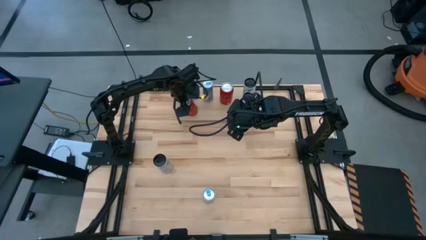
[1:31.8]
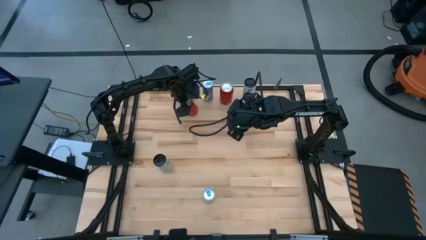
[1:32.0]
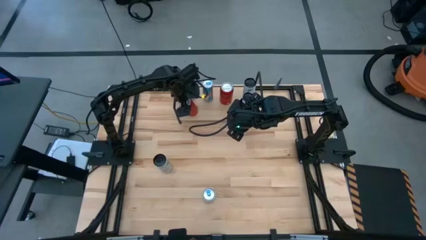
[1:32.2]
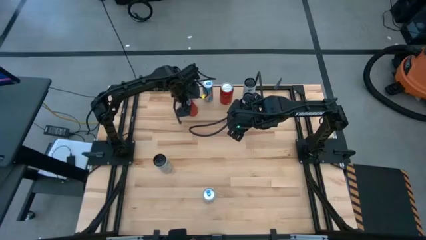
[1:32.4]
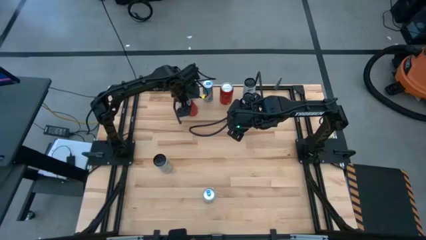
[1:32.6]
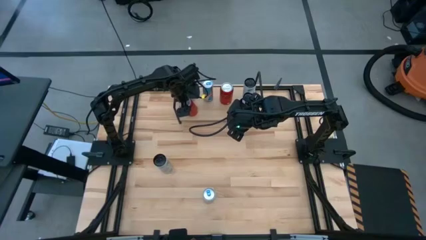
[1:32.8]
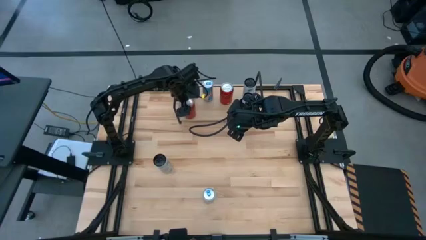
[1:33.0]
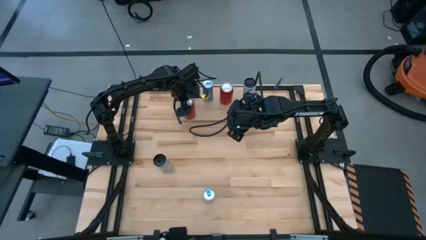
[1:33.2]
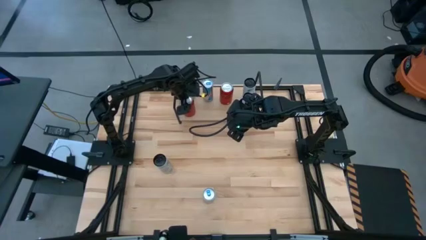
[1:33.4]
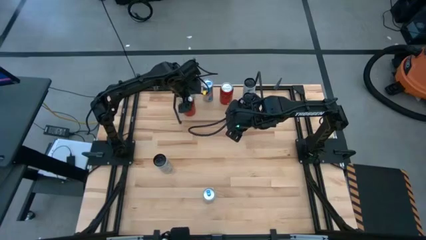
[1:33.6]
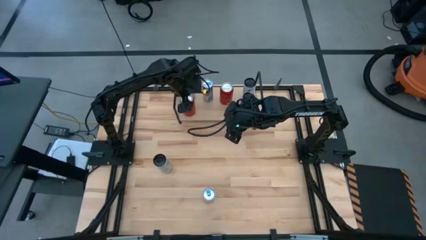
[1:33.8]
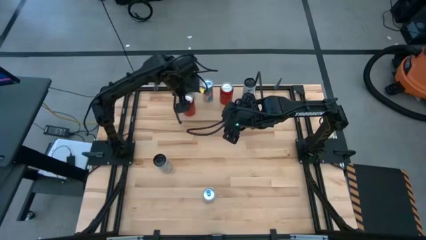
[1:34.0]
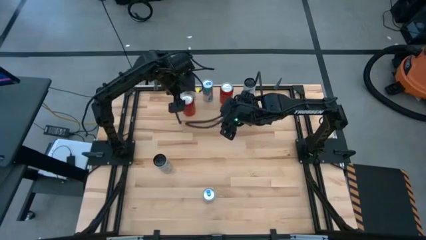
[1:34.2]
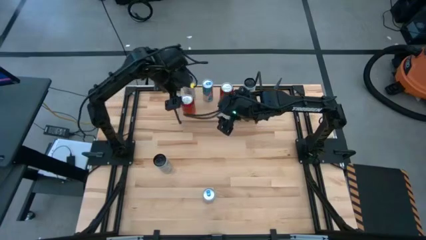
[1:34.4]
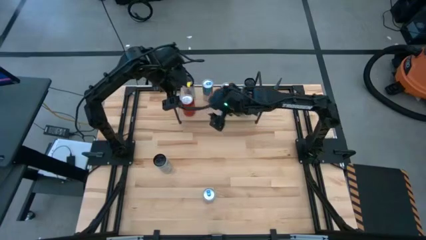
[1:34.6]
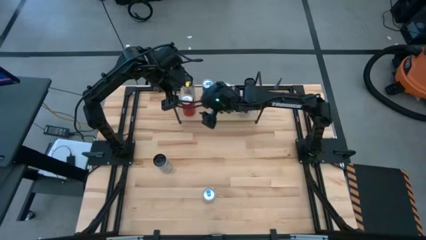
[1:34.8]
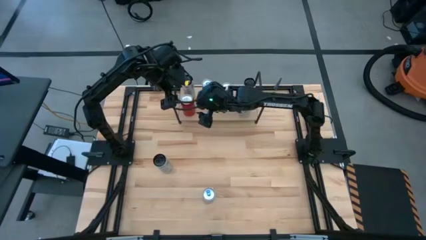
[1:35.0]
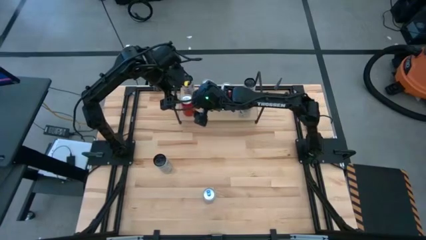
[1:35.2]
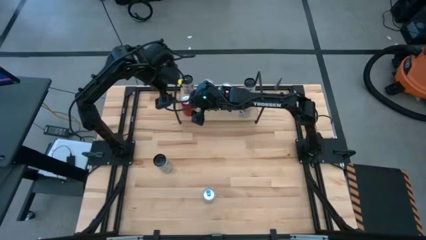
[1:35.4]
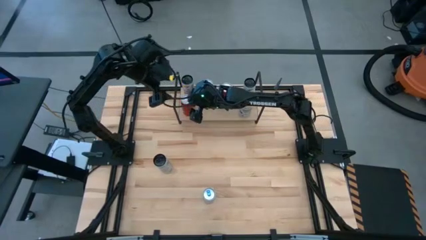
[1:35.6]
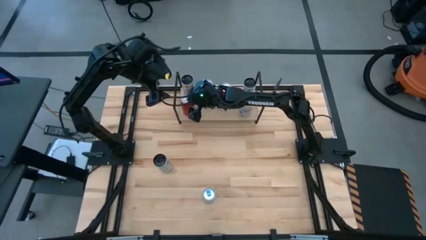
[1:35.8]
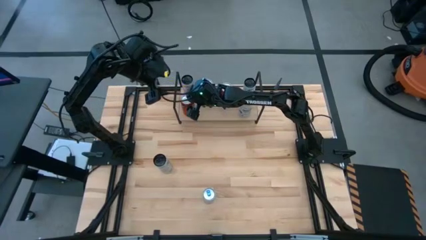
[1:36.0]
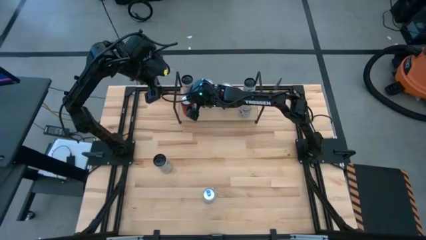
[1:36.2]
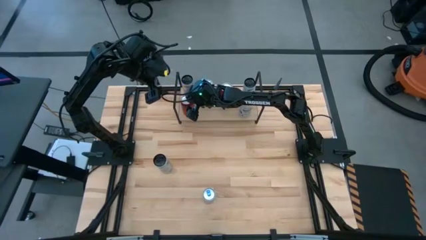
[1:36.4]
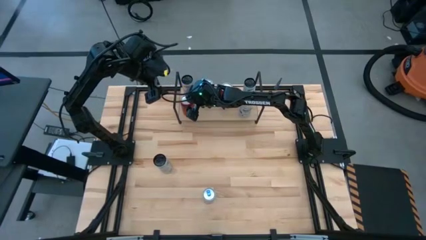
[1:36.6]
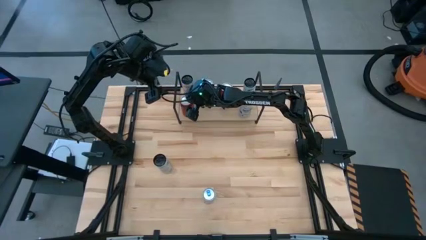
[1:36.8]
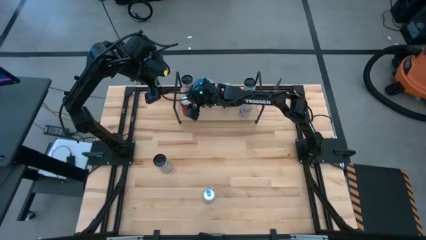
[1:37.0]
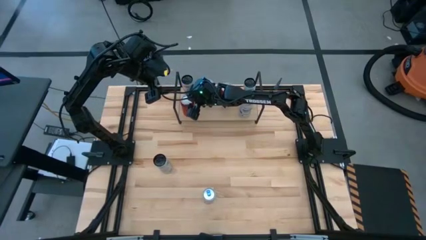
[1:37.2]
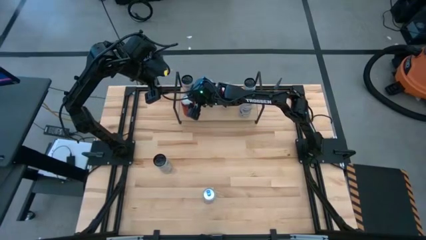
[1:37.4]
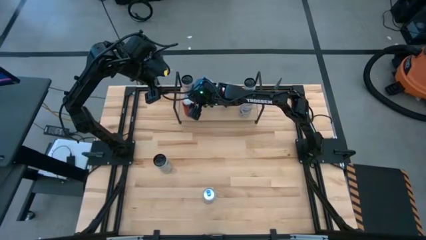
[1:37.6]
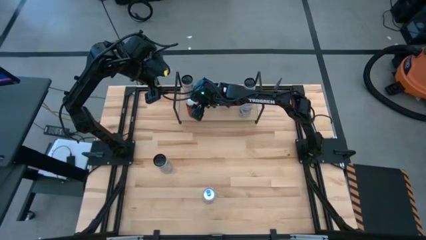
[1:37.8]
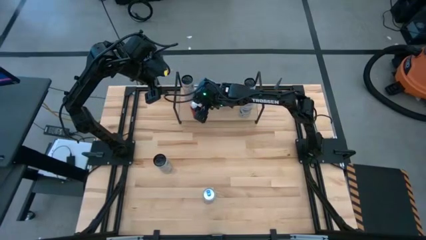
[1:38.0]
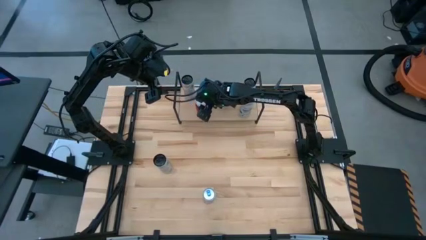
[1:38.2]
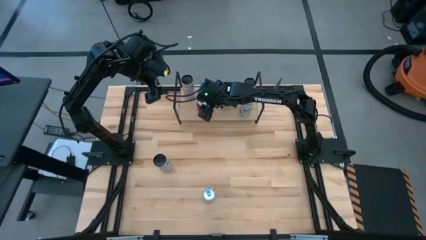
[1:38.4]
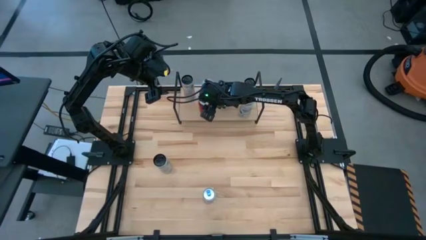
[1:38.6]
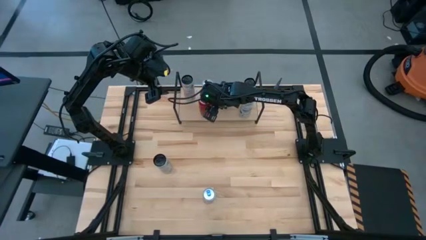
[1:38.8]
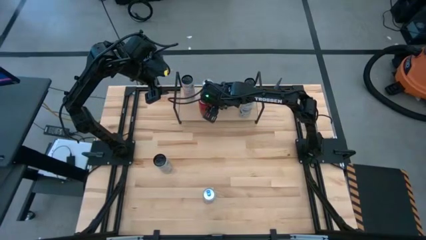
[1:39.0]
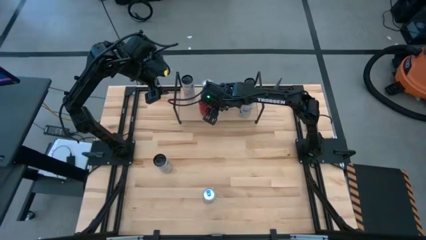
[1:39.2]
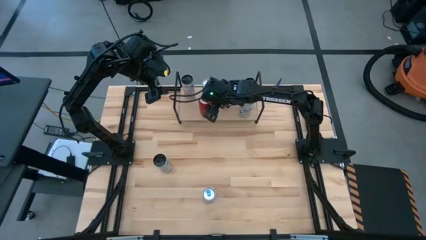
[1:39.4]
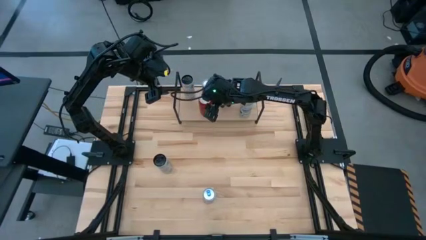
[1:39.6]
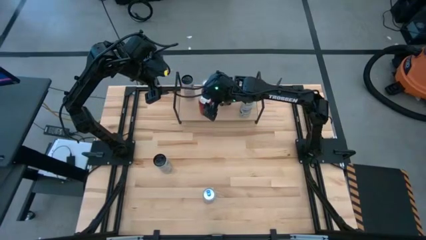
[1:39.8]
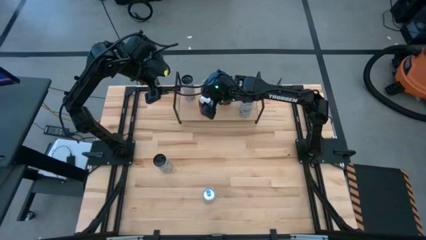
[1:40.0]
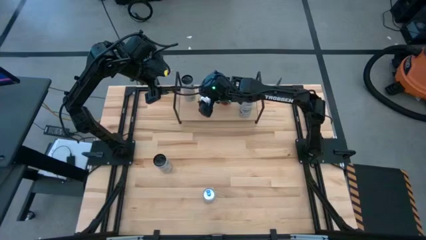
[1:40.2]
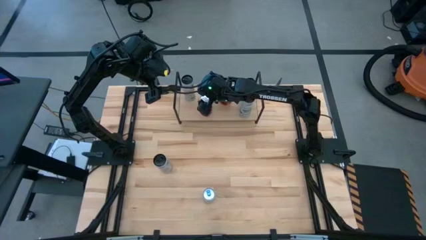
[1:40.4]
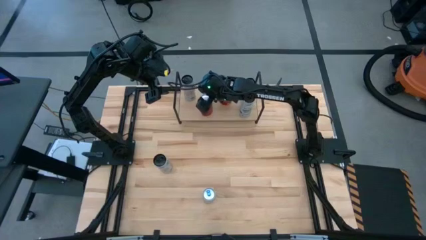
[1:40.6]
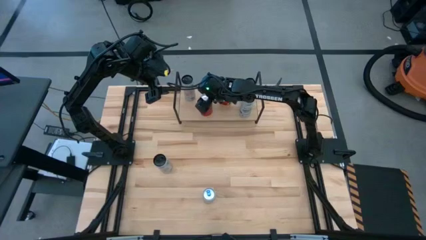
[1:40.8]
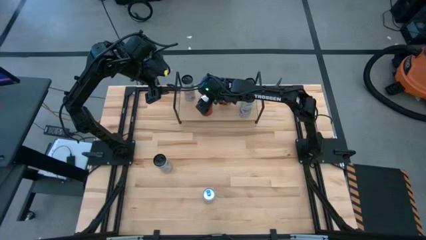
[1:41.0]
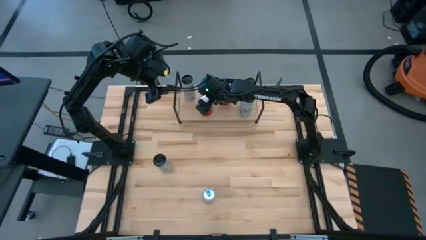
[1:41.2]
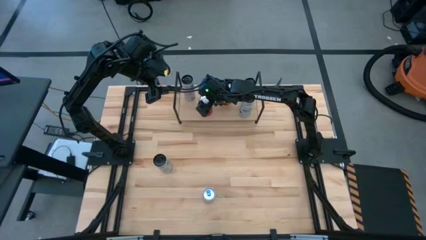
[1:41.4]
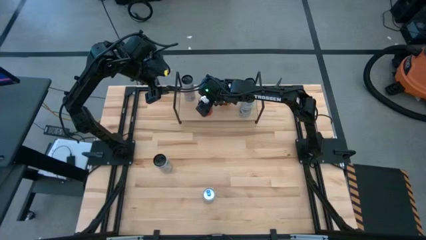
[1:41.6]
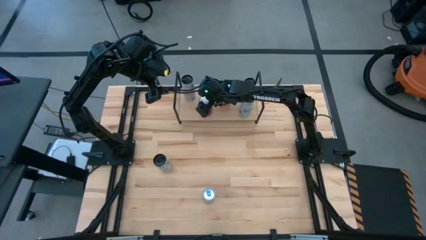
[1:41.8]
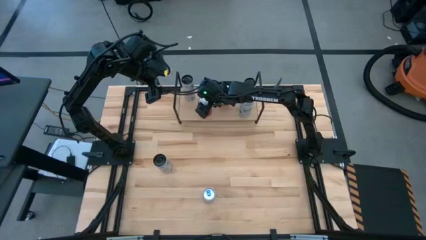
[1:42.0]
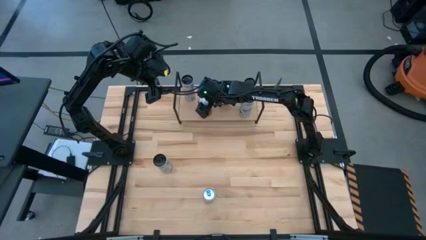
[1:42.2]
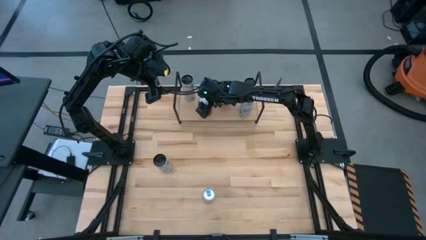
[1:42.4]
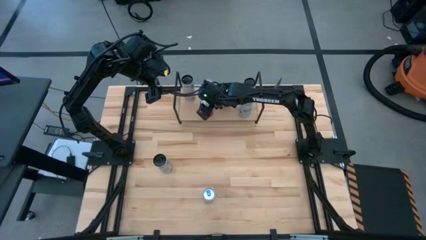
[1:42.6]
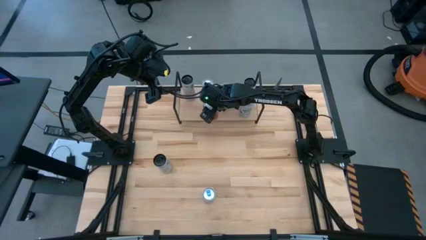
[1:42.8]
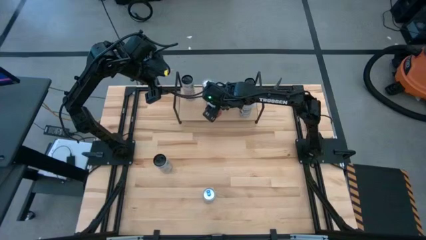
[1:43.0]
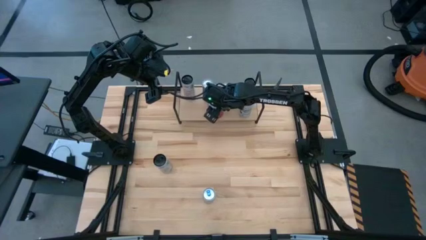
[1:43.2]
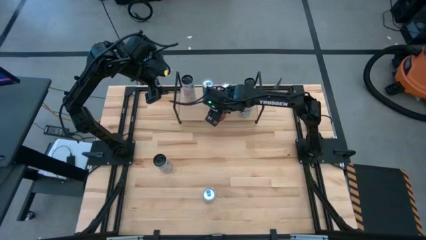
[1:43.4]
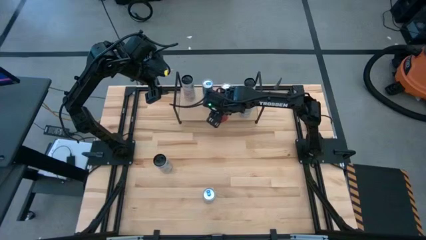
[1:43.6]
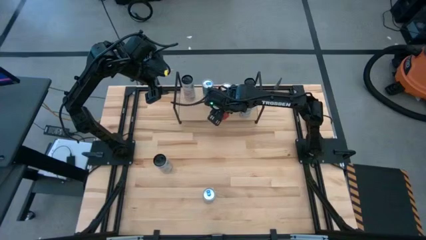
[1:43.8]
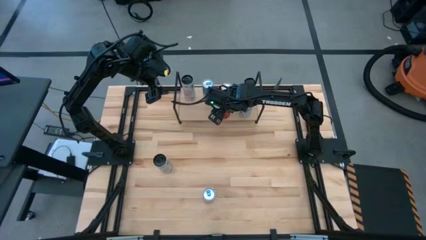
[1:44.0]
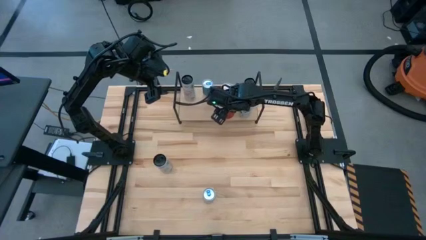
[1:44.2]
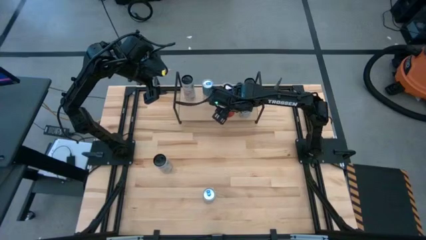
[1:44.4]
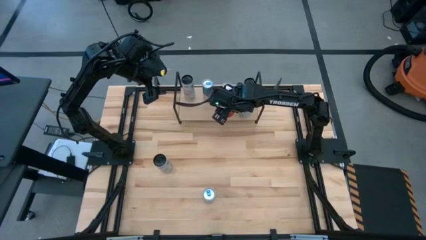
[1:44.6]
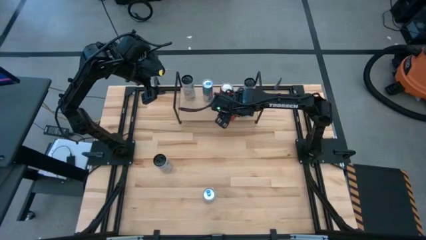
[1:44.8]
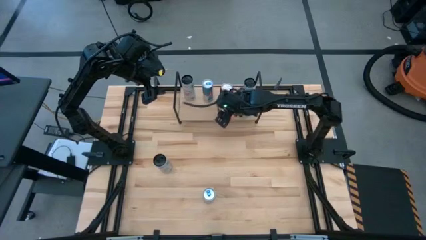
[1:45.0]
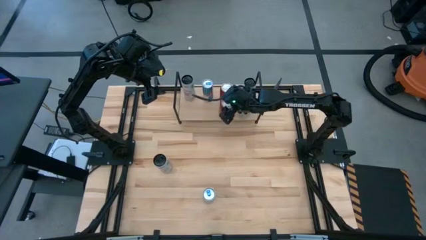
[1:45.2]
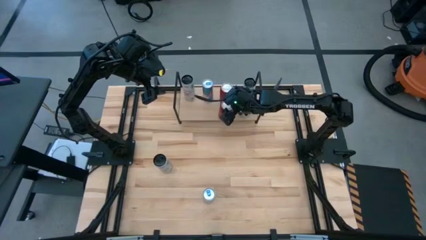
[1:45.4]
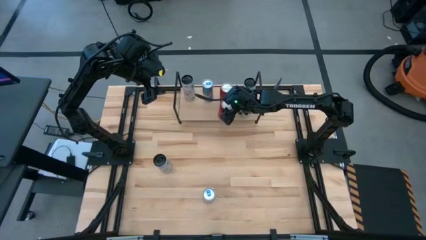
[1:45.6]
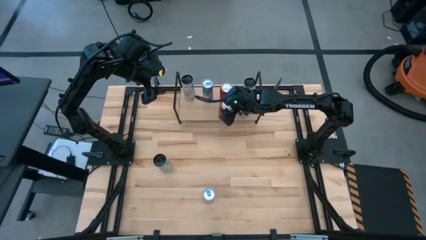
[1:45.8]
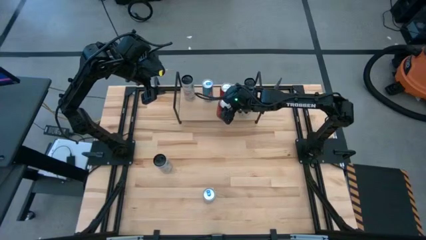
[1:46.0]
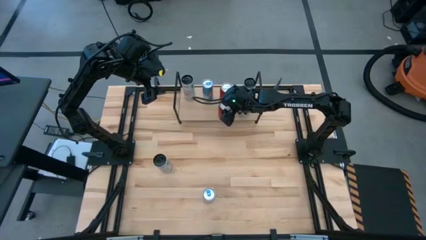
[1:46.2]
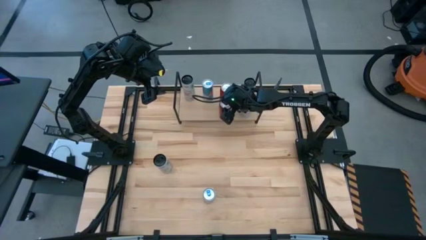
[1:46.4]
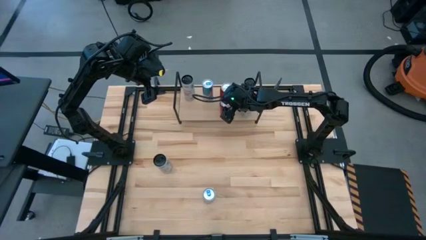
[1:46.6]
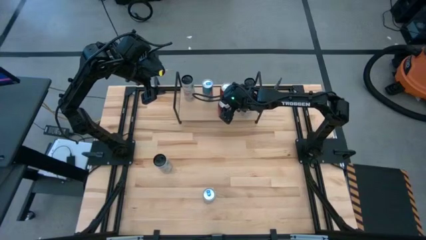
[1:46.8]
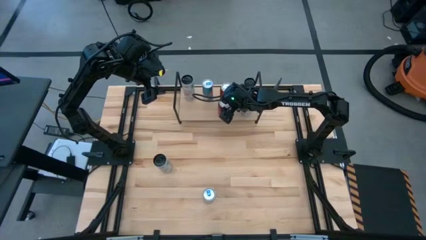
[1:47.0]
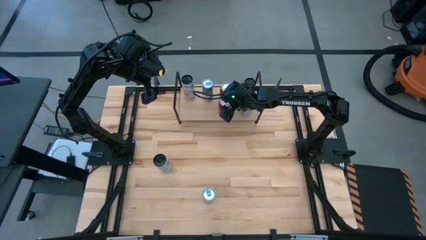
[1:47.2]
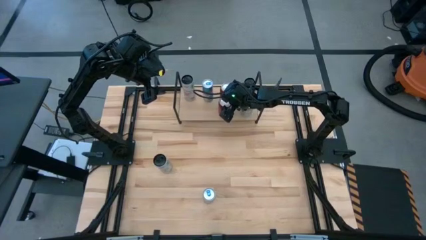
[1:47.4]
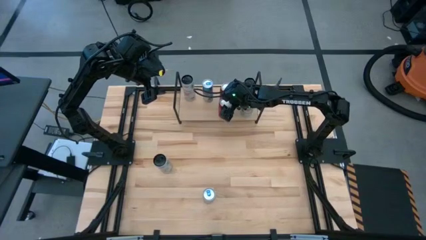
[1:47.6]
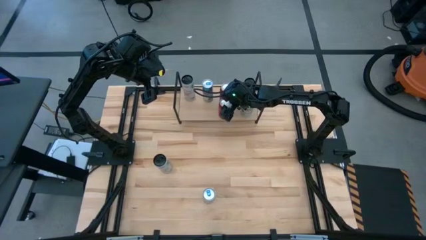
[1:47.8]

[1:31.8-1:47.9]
Task: Place canned beverage on shelf
Align the red and black soda can with the red and black soda can on the shelf
